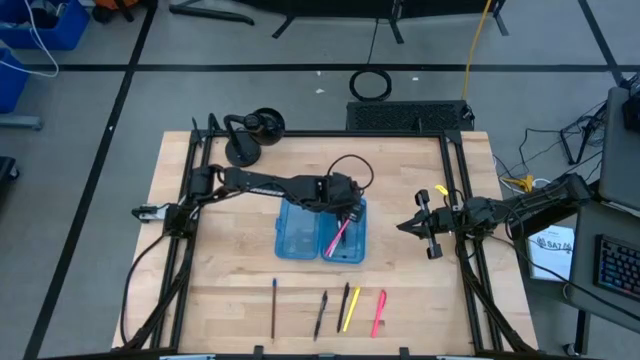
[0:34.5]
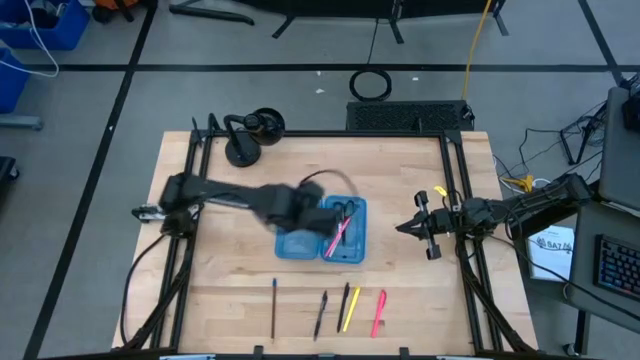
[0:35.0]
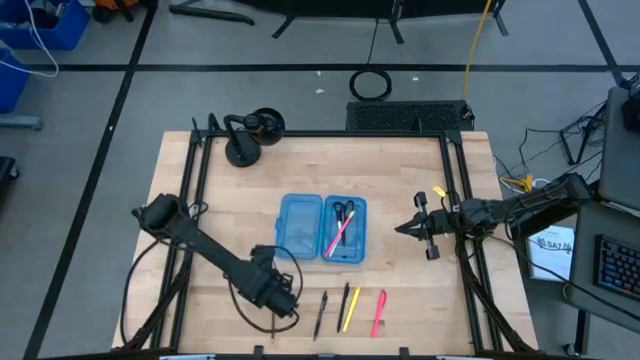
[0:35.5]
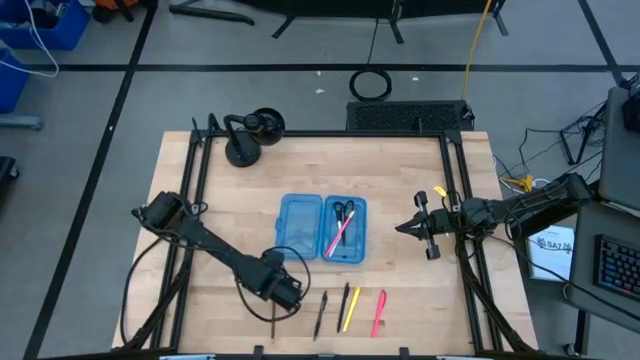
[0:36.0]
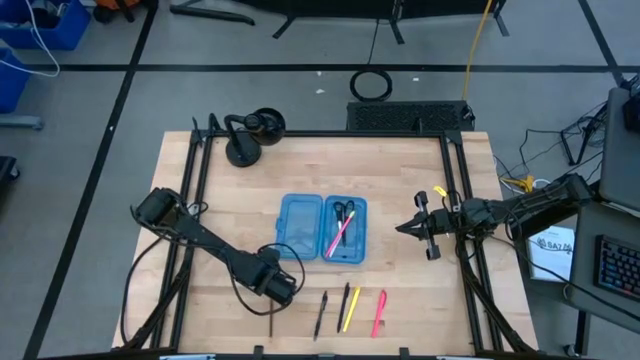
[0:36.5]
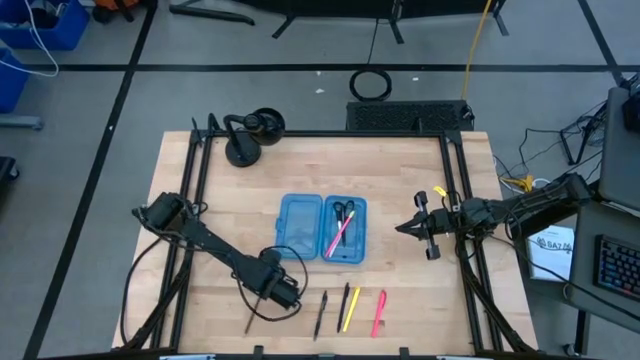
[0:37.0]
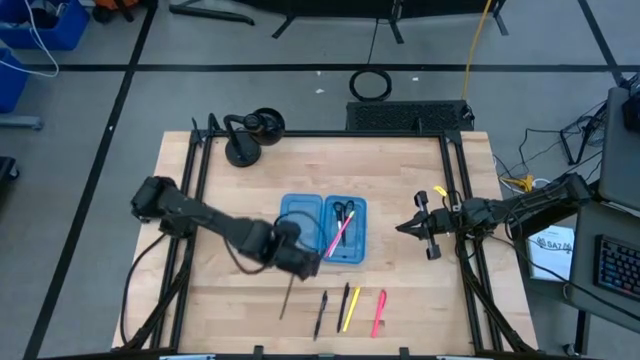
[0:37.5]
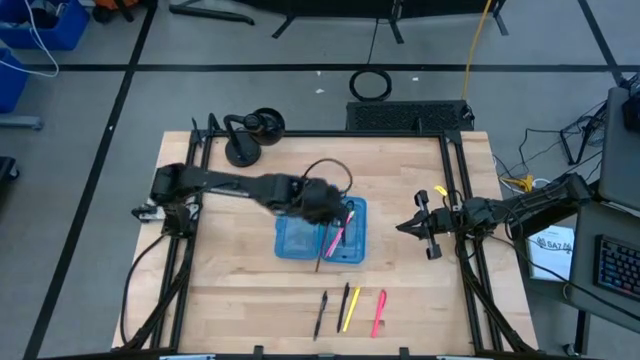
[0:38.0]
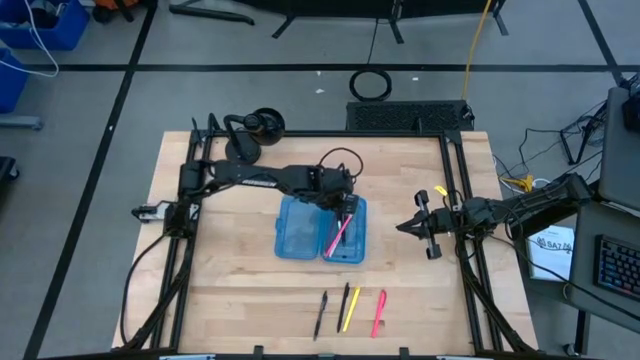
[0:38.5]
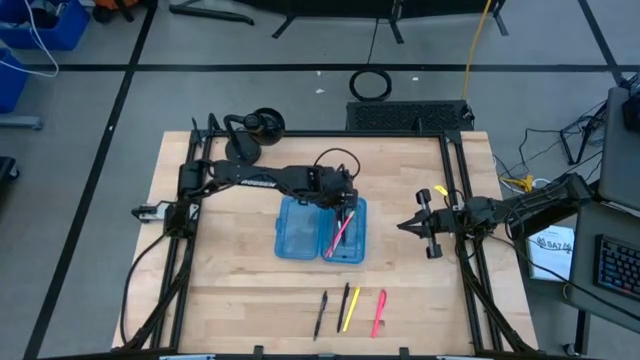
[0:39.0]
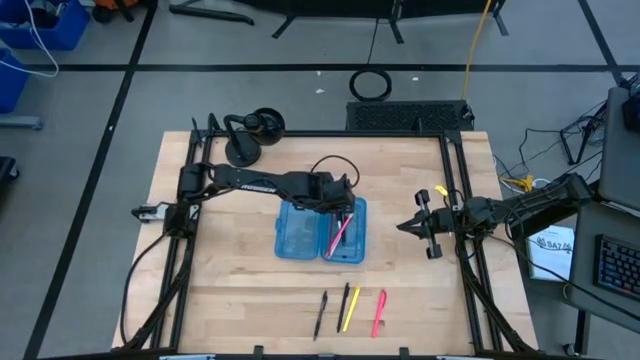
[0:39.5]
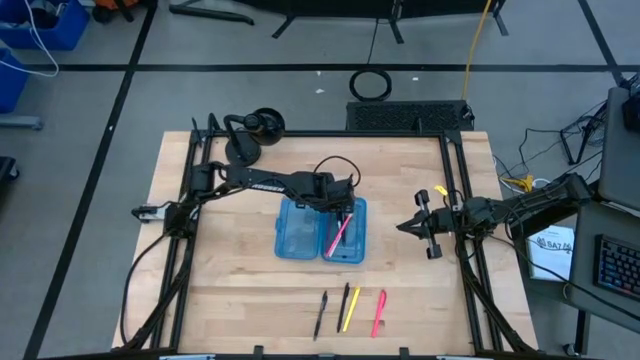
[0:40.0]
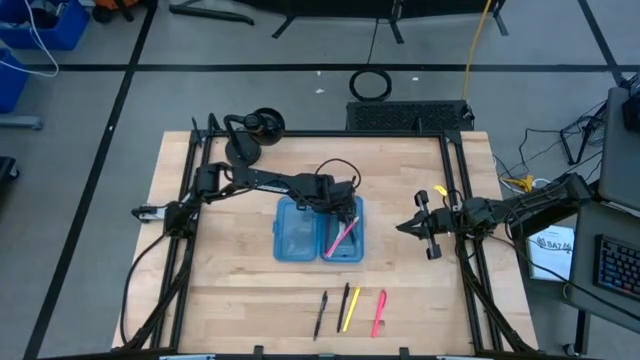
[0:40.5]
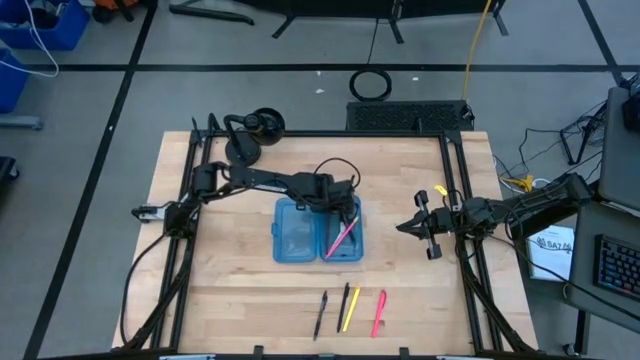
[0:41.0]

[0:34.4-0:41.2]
Task: Pick & place school supplies into a supply box
Put the brown pencil into the blue supply box

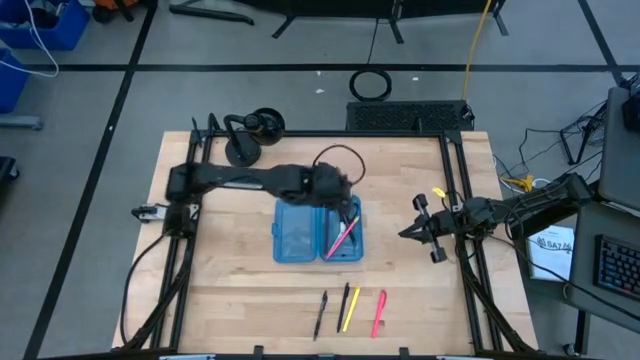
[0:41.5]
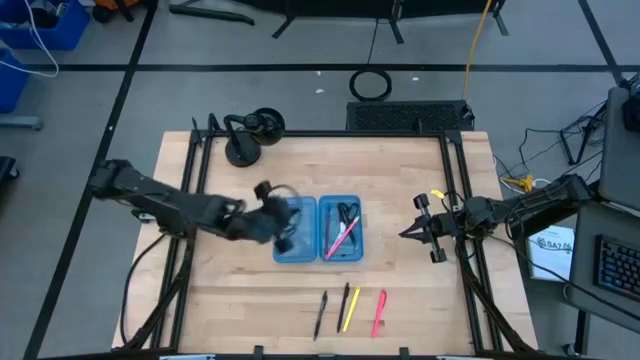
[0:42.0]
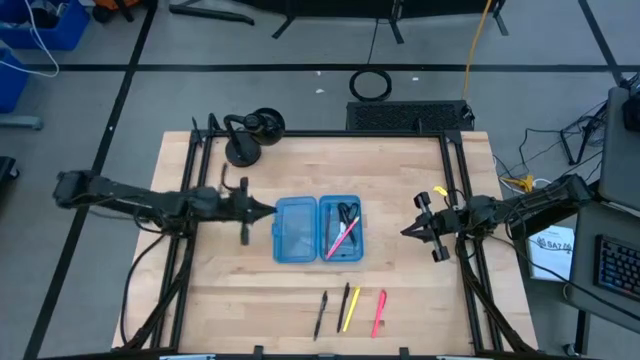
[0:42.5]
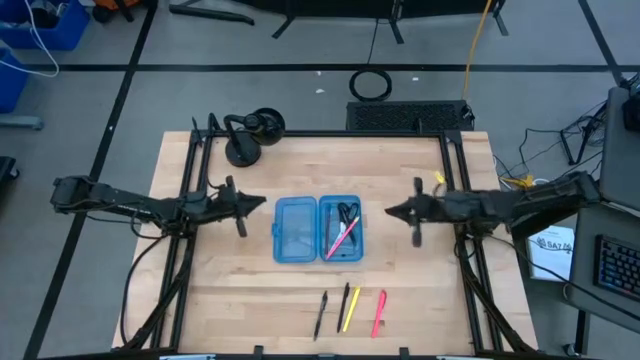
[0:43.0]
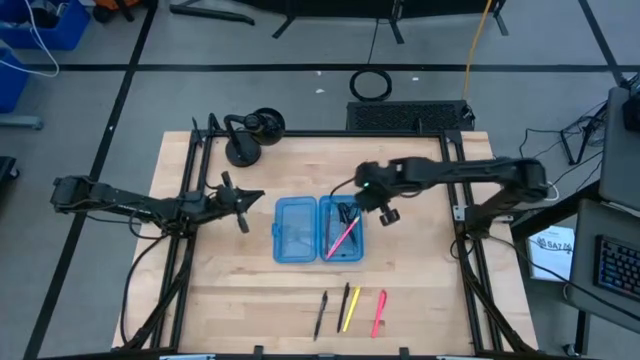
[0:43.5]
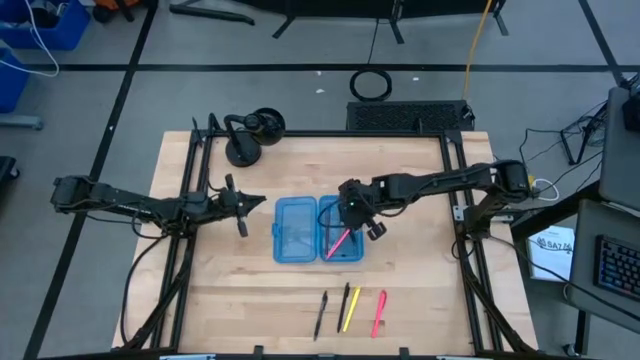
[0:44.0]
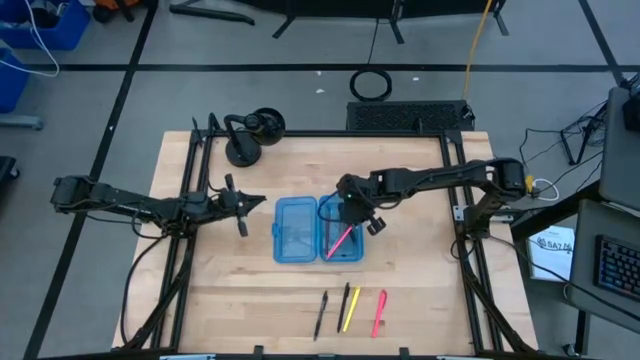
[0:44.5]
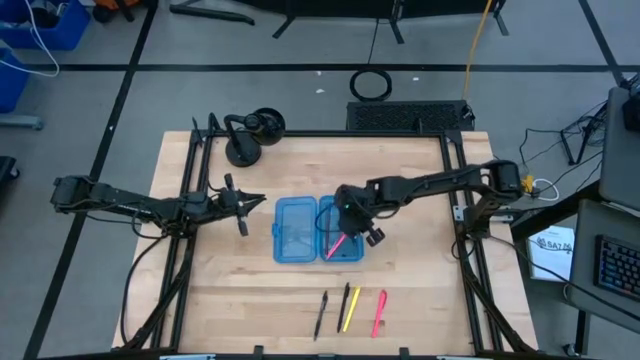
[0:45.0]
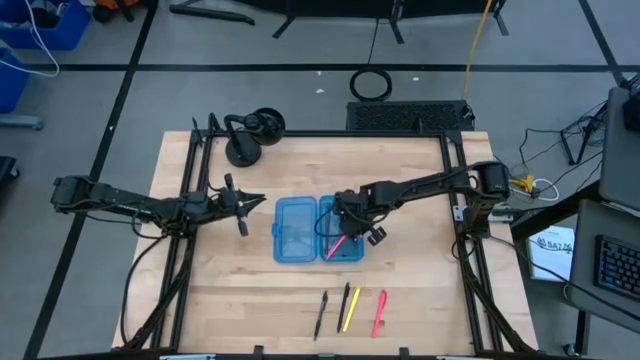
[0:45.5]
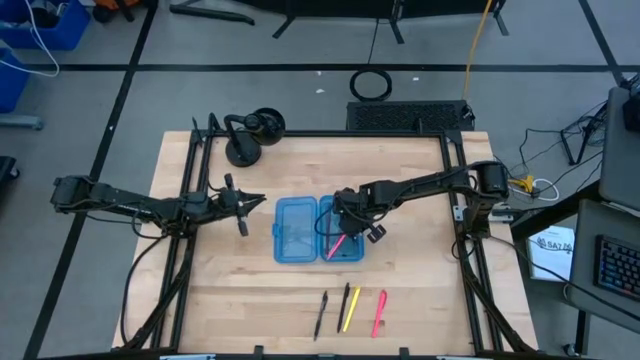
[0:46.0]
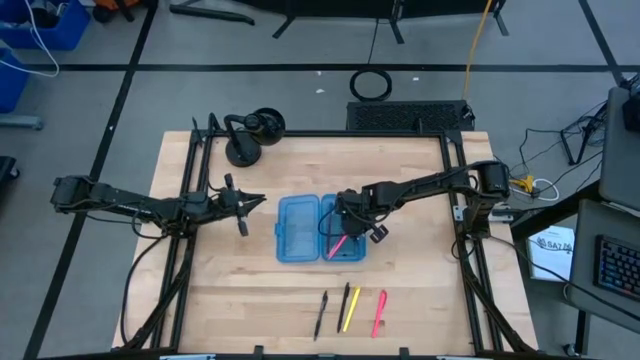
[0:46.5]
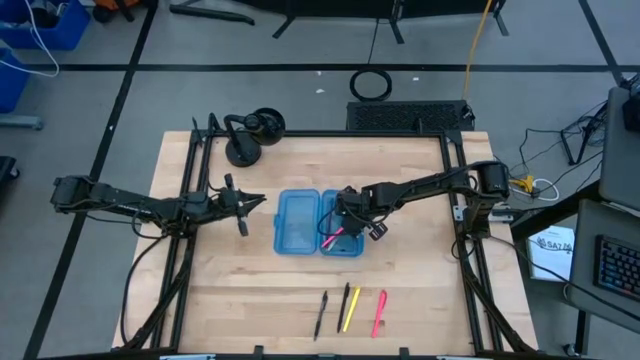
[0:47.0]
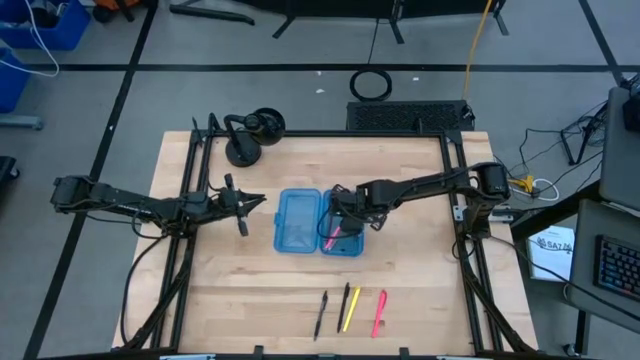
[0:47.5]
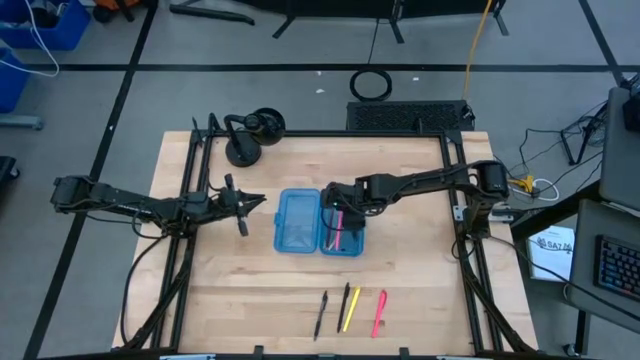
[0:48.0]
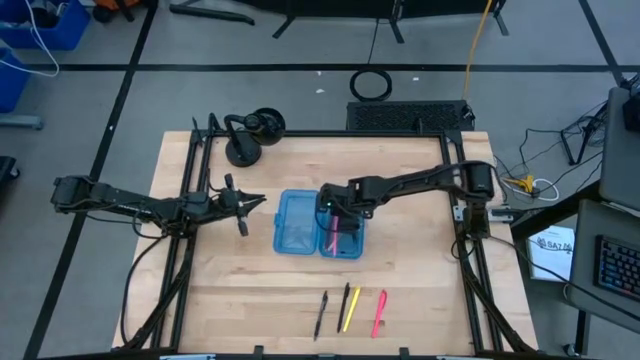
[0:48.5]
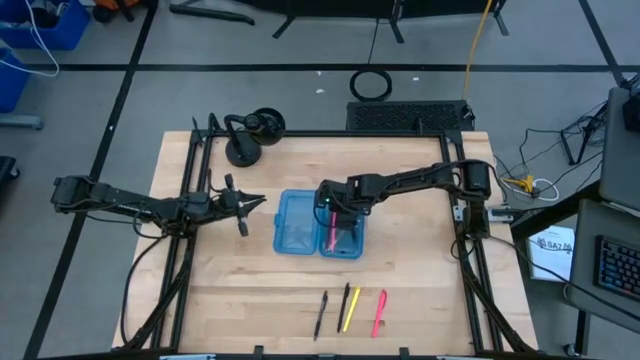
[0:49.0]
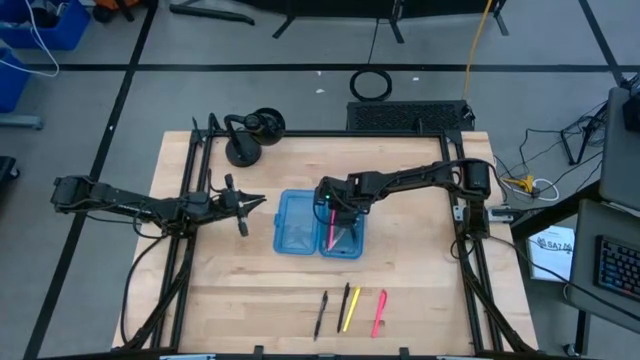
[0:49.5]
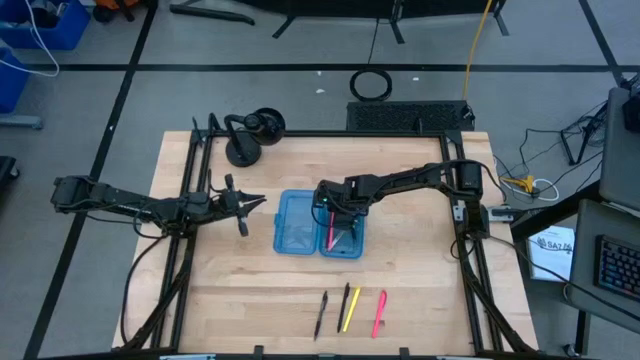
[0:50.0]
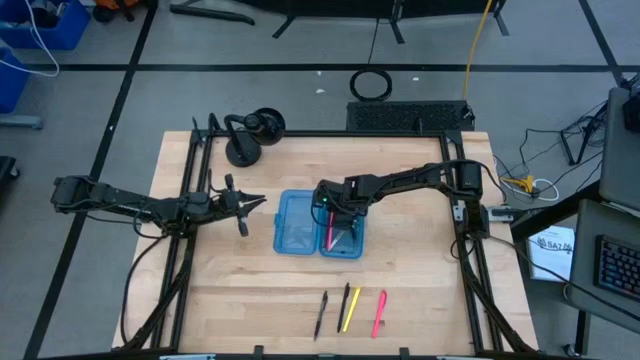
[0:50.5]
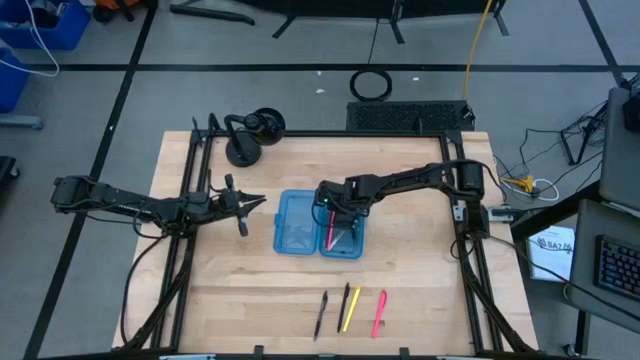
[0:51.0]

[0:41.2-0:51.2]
Adjust the pink pencil in the blue supply box

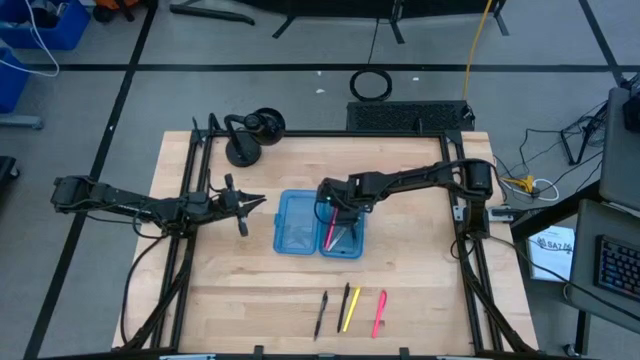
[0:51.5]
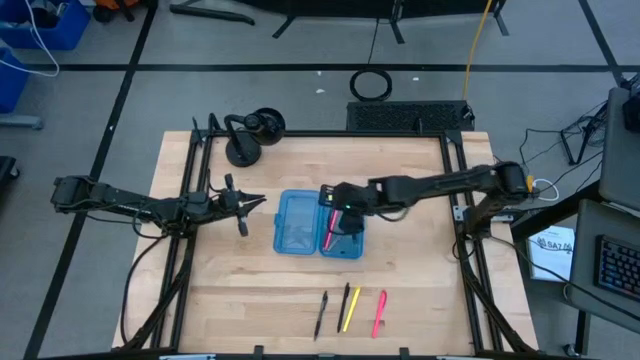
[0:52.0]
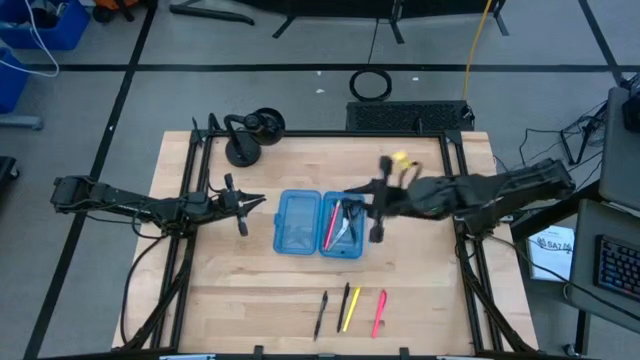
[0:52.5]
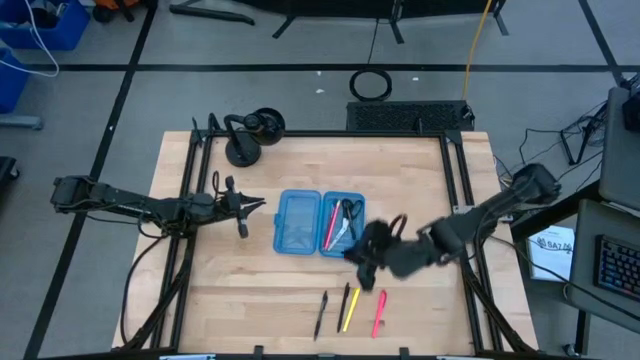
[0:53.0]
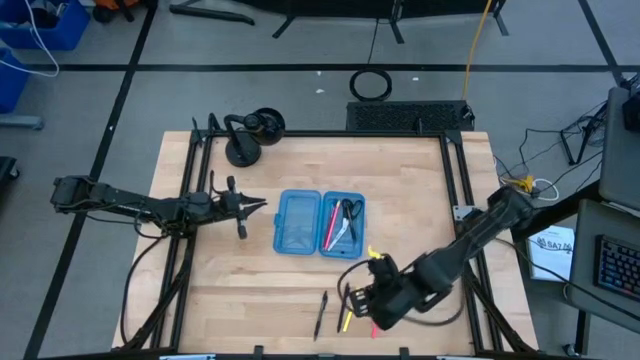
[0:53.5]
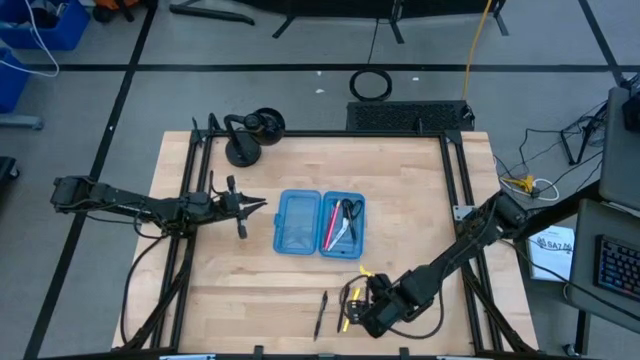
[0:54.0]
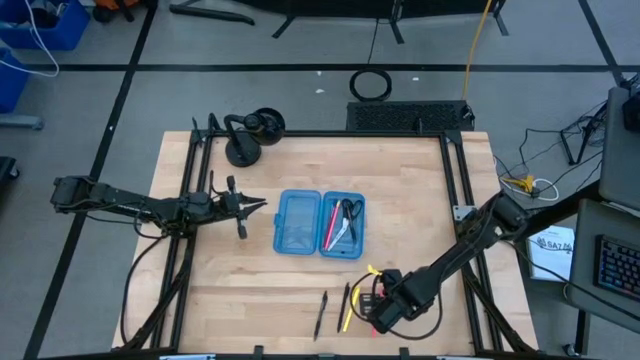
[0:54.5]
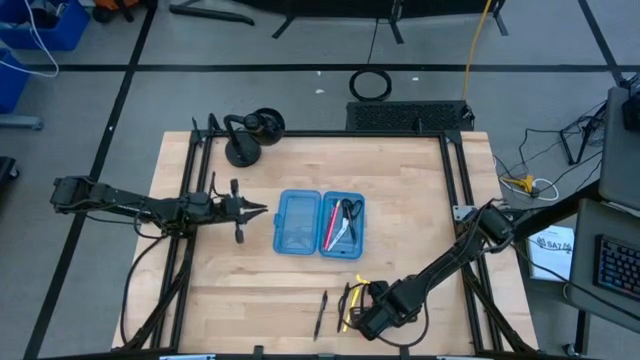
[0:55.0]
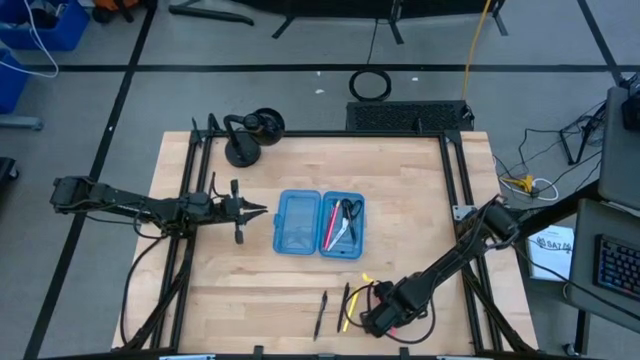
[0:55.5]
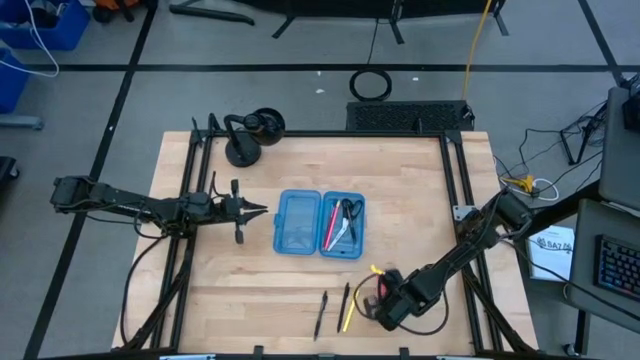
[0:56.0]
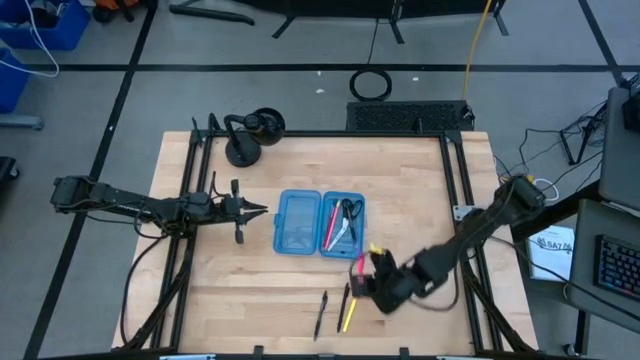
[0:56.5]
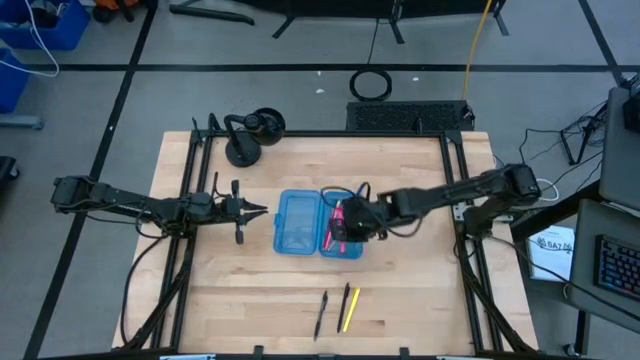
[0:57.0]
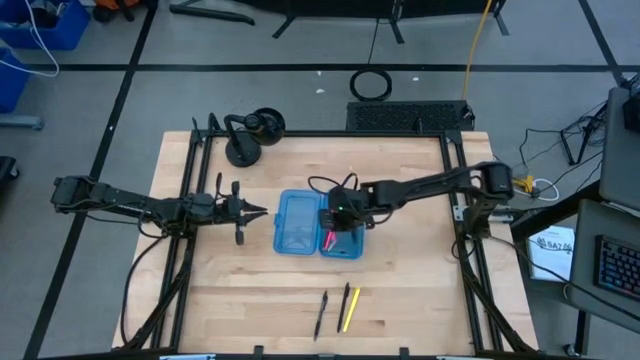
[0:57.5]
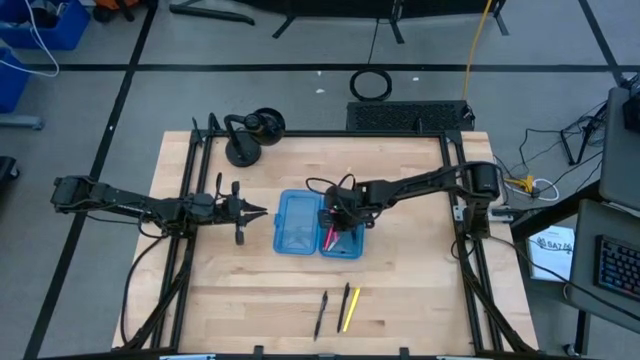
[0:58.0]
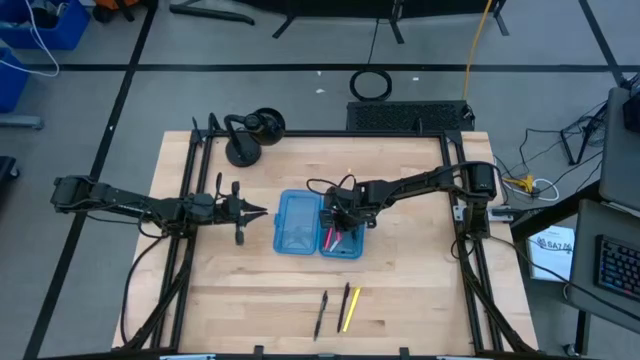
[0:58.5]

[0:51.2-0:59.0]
Put the pink pen into the blue supply box
